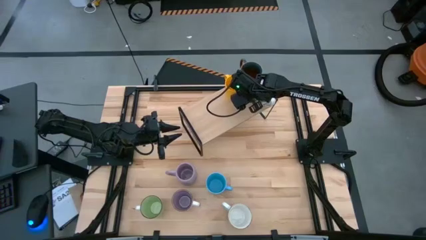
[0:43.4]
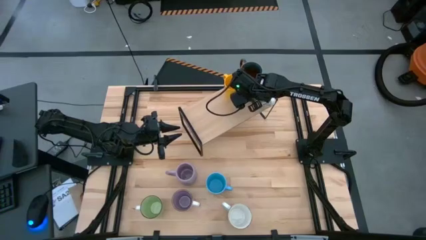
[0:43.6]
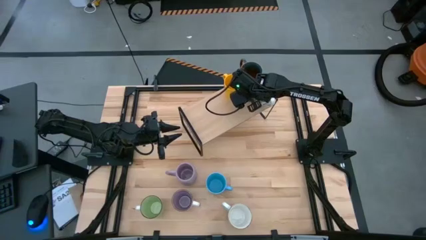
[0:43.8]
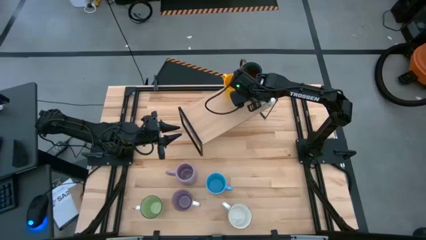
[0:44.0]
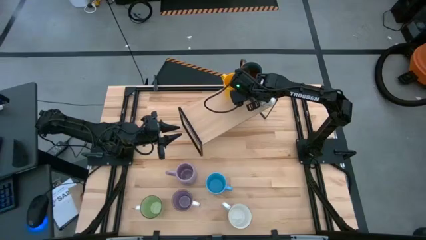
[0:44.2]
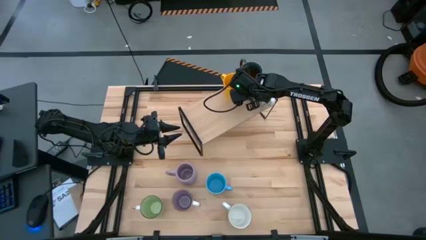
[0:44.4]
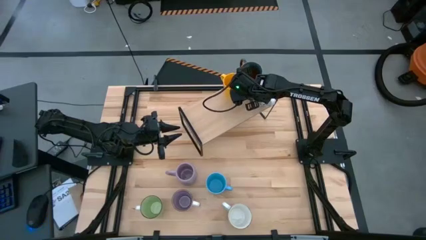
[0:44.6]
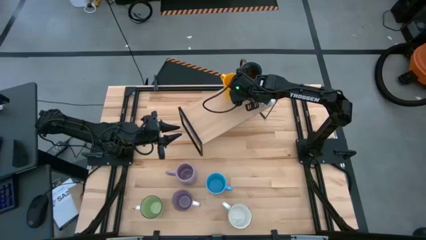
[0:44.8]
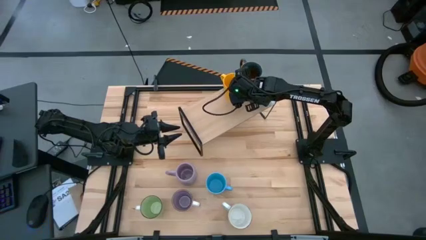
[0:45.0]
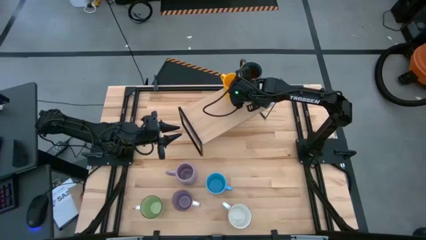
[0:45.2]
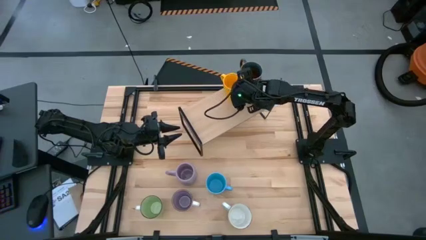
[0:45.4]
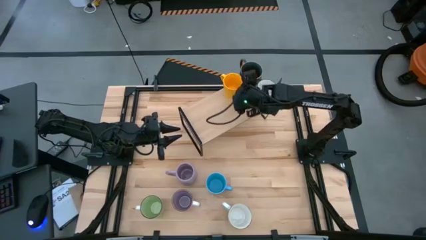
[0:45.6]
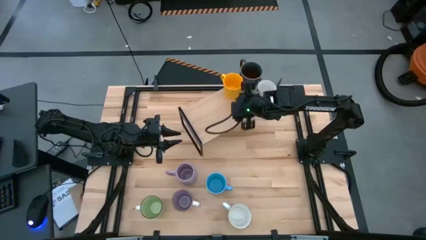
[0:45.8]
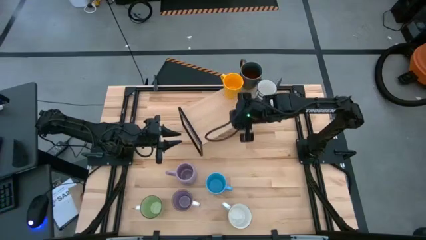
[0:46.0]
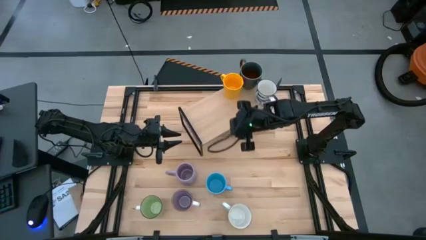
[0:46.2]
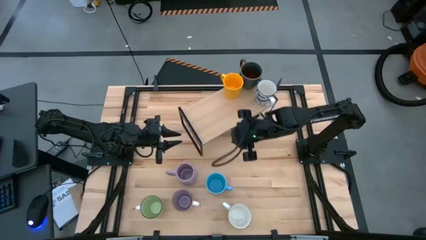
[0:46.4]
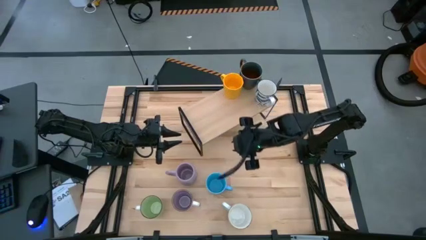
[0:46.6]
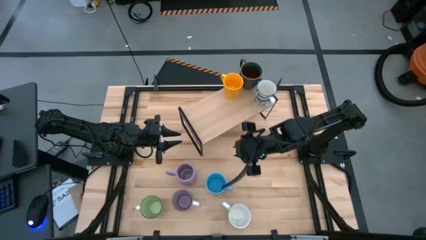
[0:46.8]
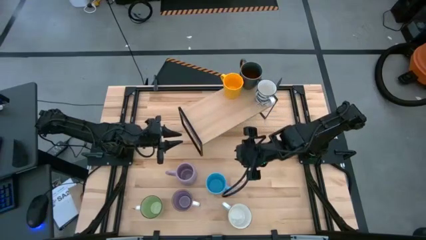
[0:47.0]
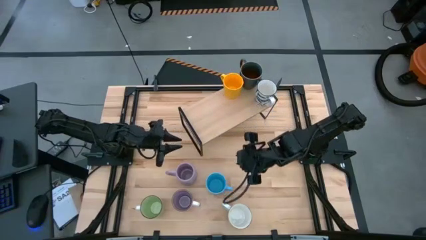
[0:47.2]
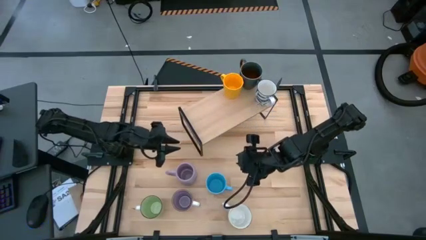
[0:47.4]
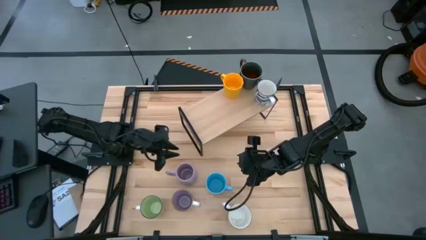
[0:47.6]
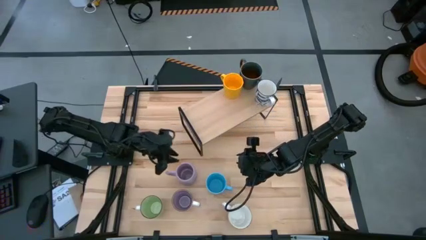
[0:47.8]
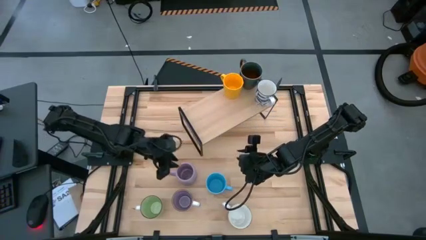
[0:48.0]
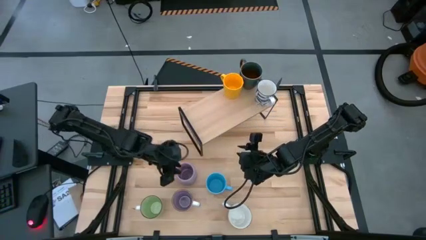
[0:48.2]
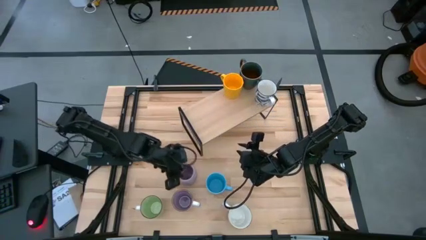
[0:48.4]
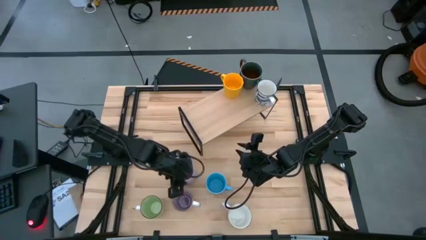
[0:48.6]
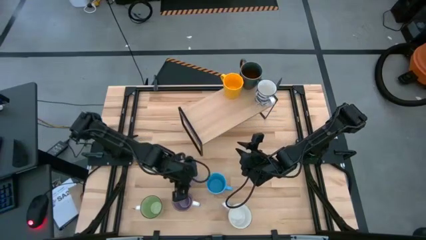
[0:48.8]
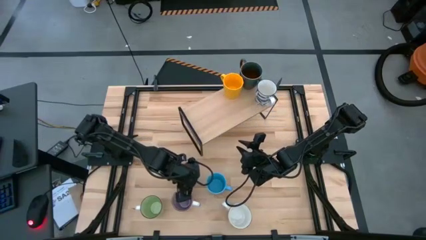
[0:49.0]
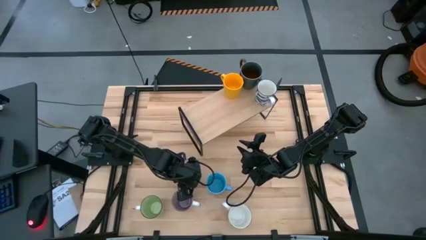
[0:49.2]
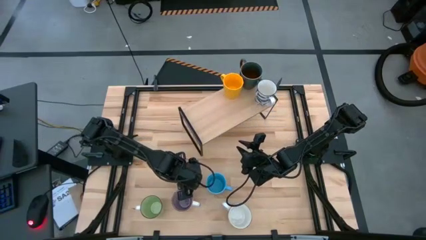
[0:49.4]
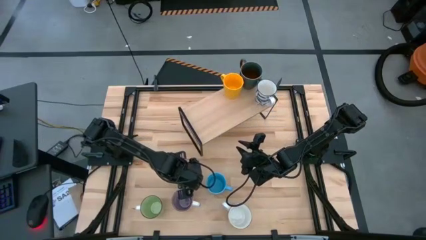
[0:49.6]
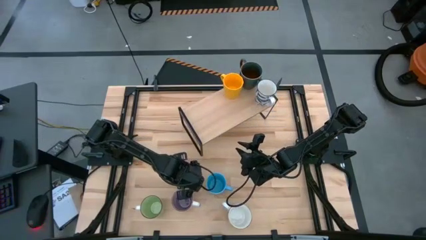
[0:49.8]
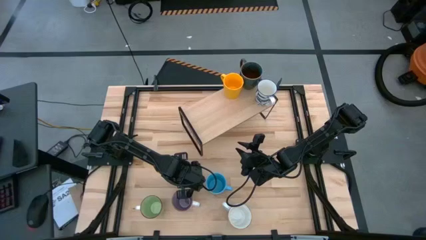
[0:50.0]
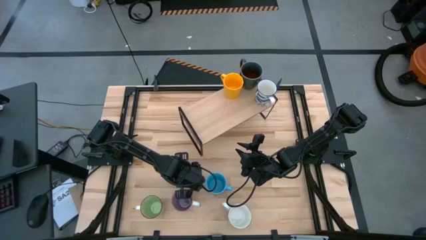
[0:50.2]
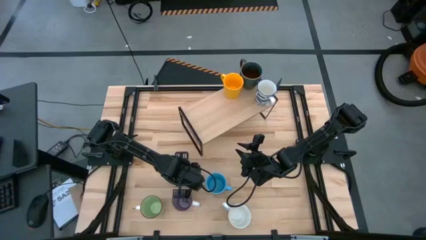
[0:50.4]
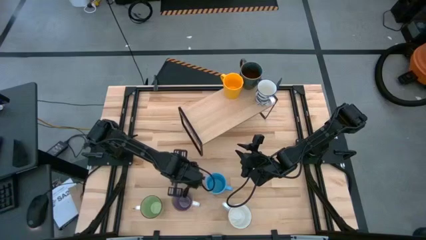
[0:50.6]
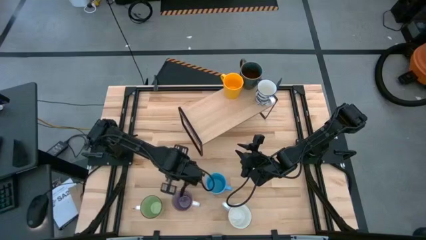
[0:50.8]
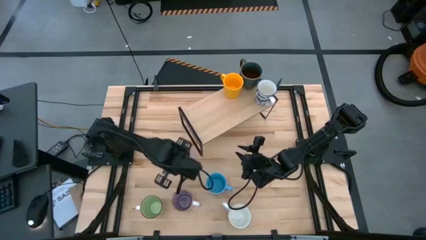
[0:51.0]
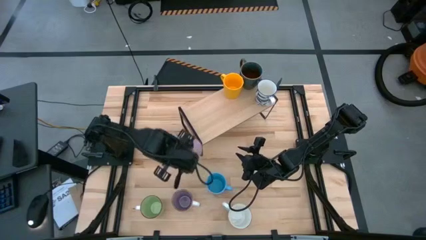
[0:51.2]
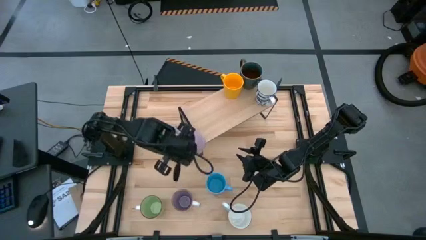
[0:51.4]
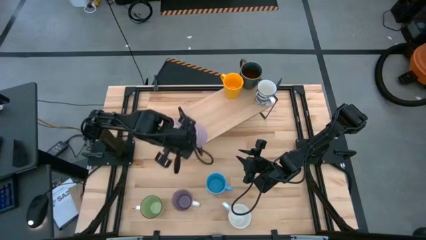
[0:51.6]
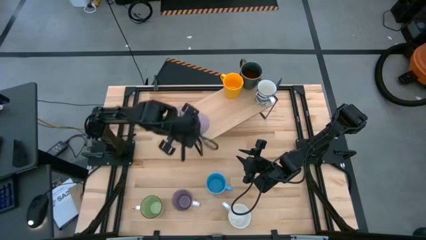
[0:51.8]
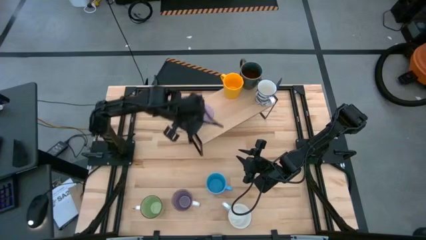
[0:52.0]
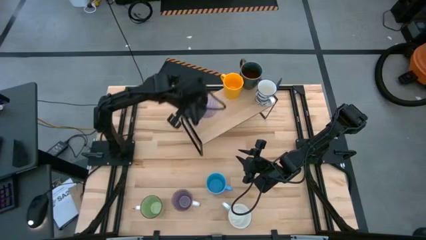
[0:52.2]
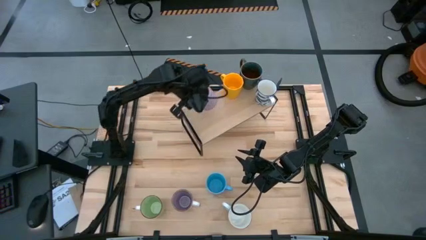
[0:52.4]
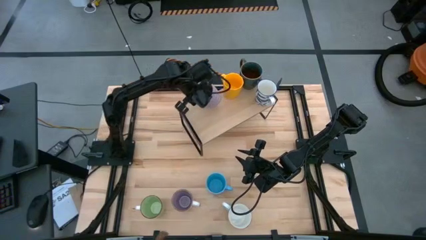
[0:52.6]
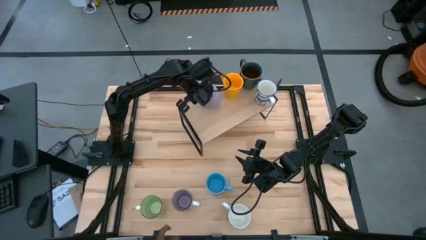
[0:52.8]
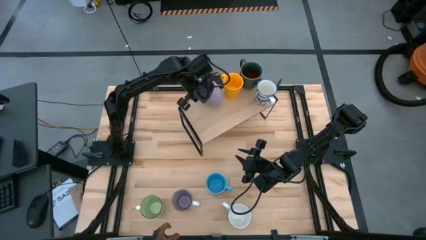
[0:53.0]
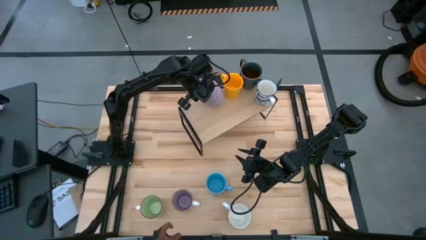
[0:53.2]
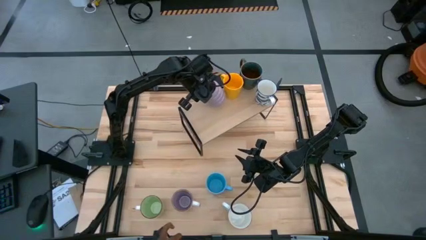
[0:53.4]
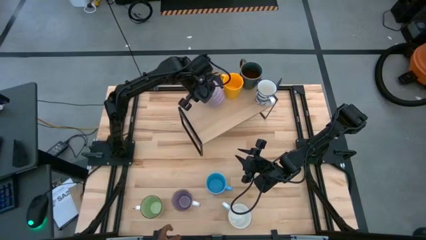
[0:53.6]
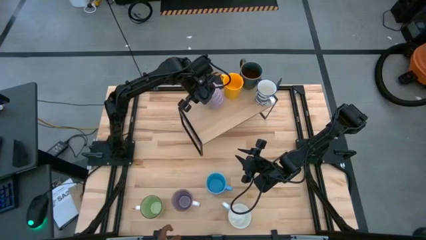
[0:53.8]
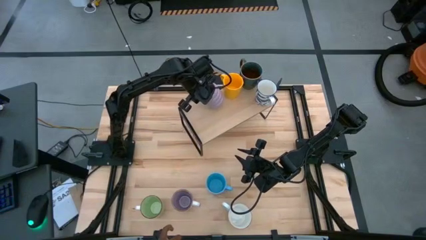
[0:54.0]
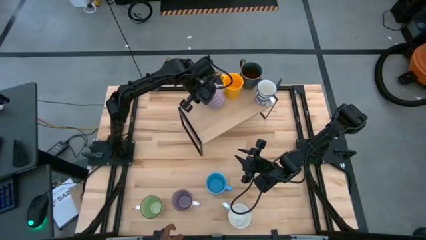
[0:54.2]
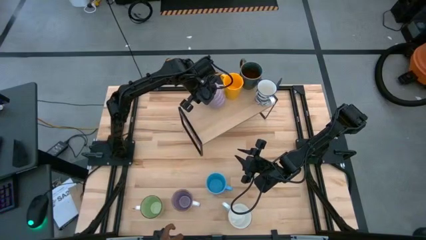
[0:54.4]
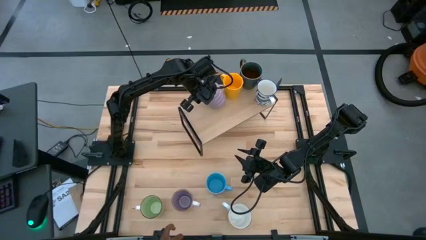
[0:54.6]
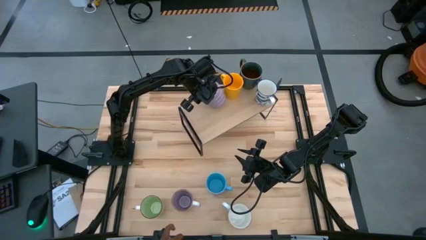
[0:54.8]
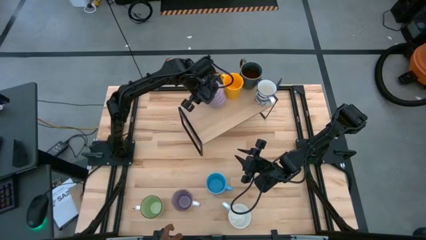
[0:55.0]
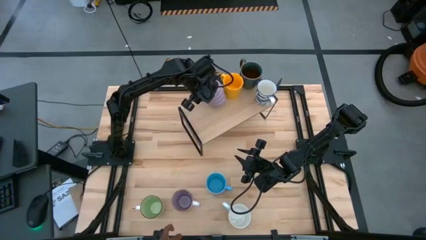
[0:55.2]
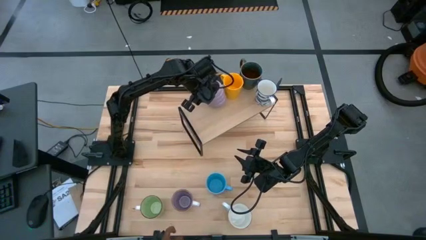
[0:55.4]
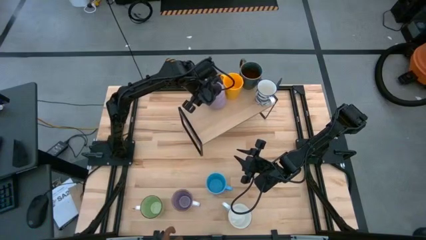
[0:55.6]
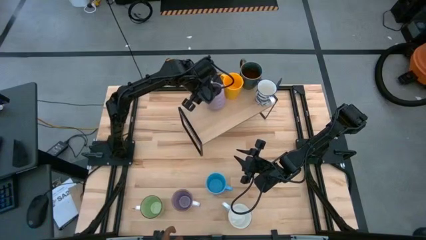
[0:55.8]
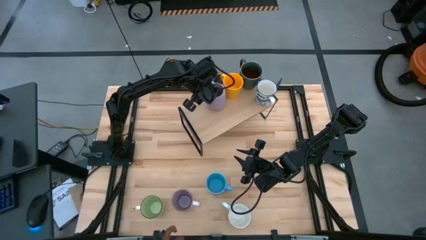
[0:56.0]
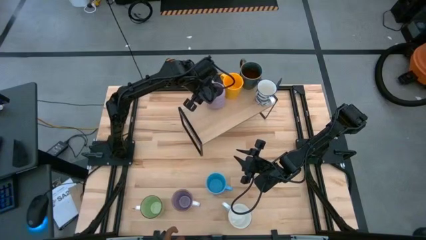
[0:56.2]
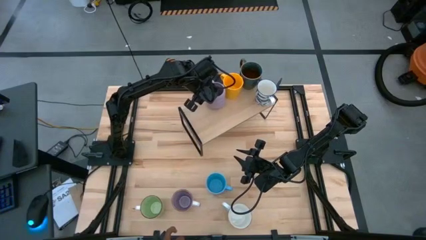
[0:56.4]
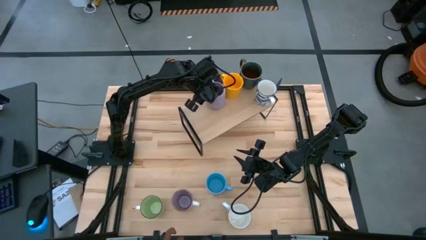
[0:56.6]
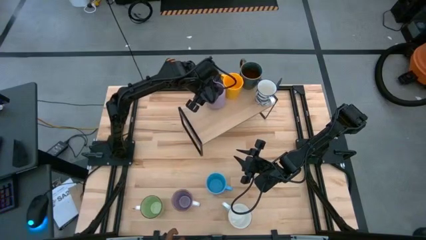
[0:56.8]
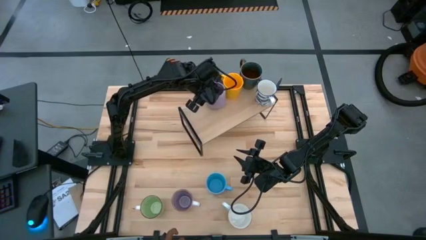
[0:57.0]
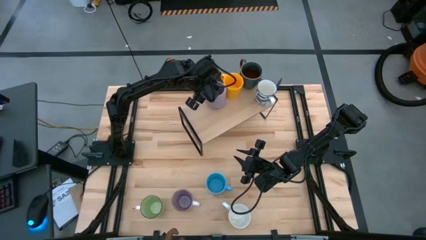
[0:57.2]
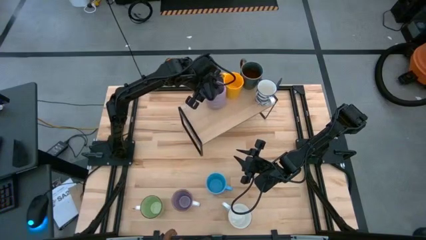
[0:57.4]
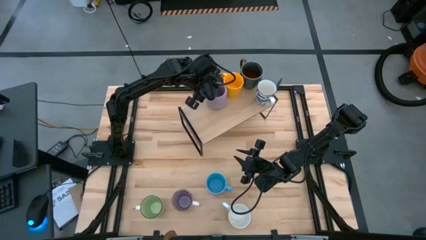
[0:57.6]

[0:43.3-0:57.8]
Task: Place coffee mugs
Put the purple mug on the shelf
